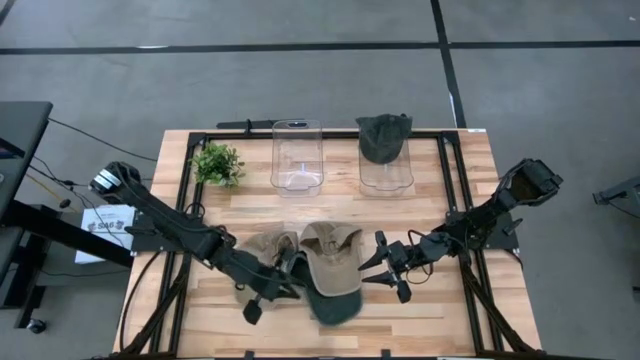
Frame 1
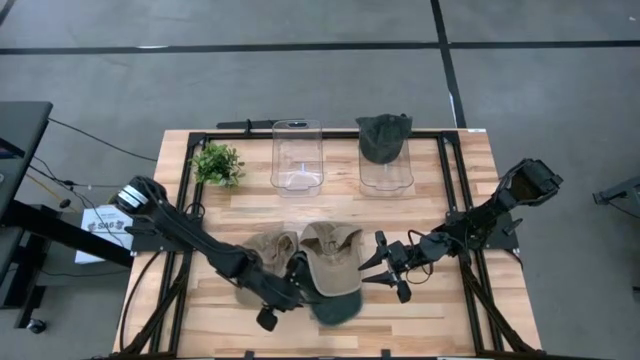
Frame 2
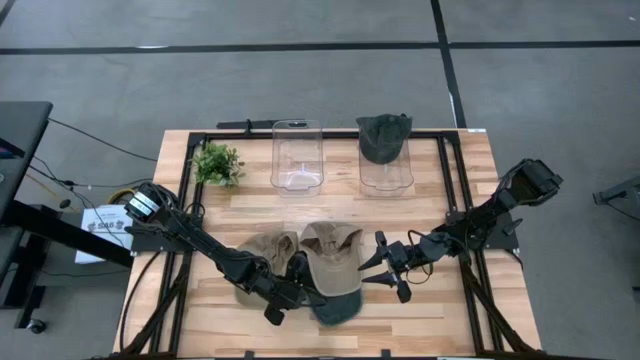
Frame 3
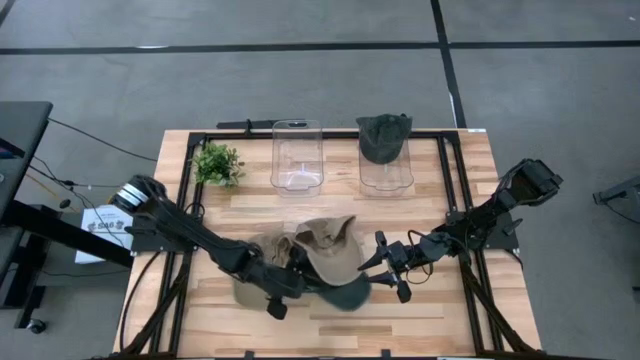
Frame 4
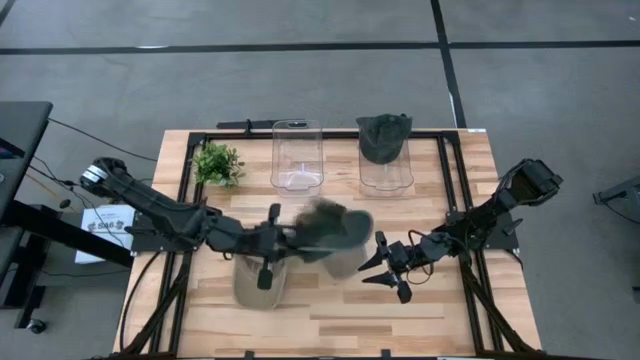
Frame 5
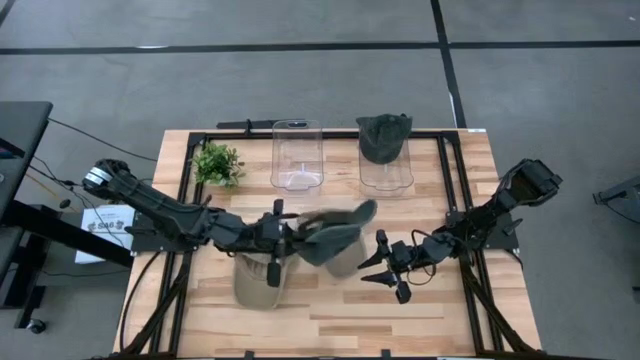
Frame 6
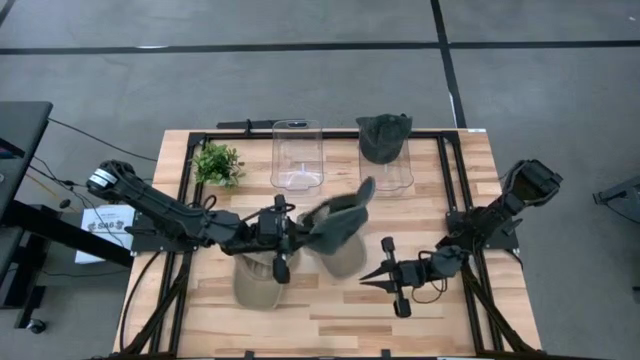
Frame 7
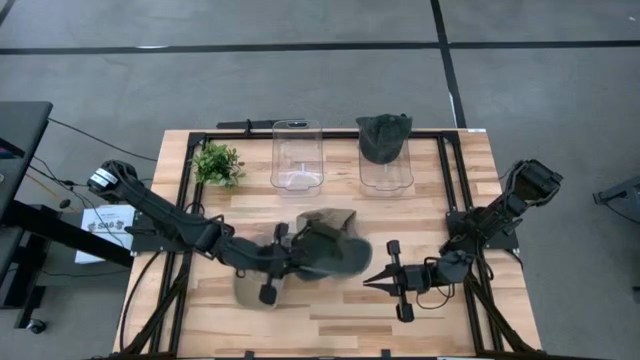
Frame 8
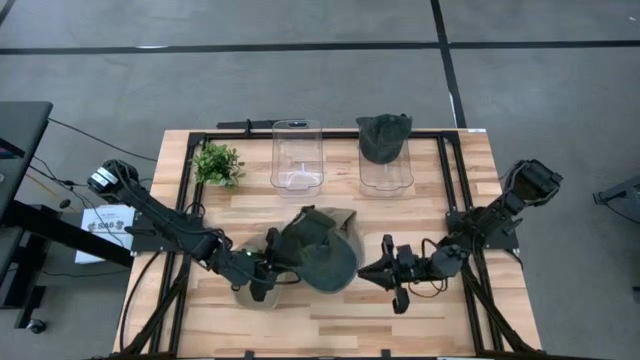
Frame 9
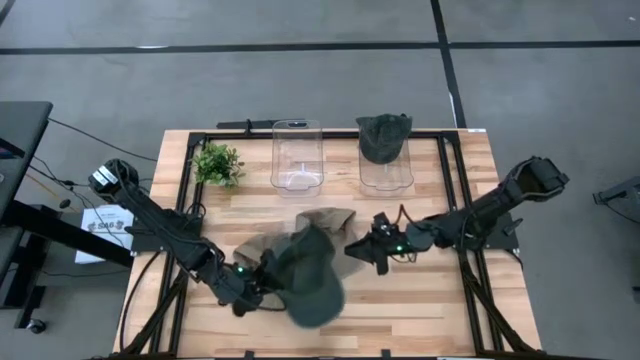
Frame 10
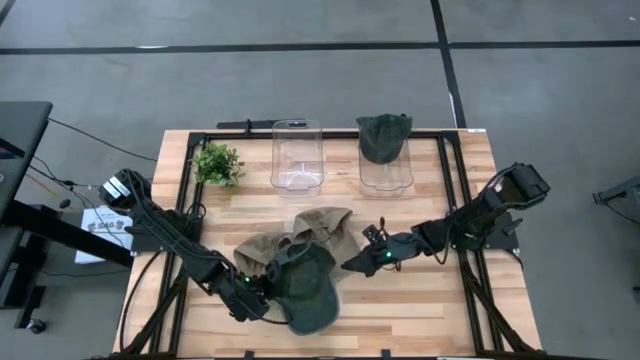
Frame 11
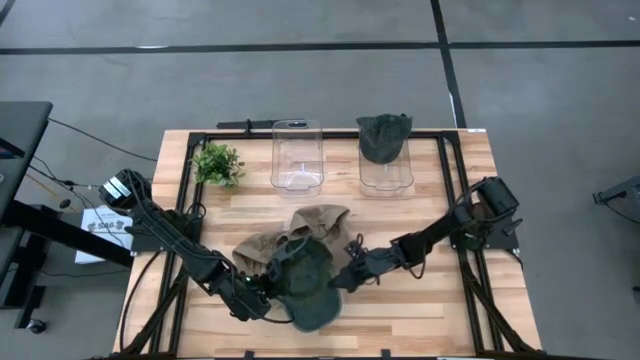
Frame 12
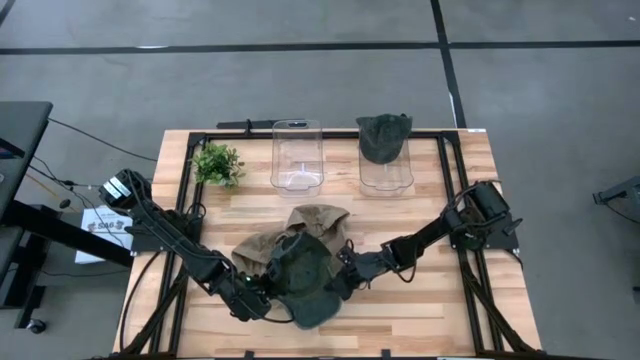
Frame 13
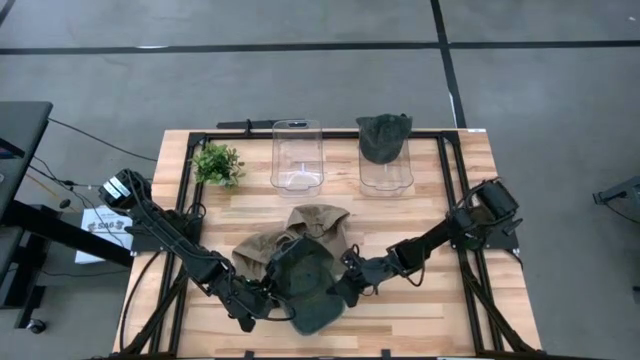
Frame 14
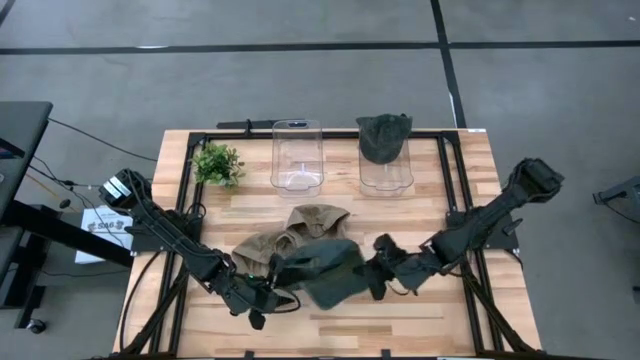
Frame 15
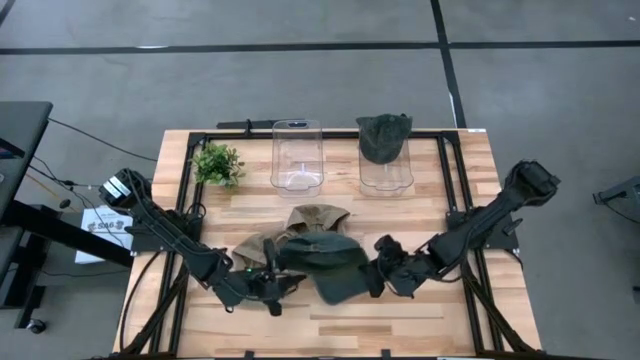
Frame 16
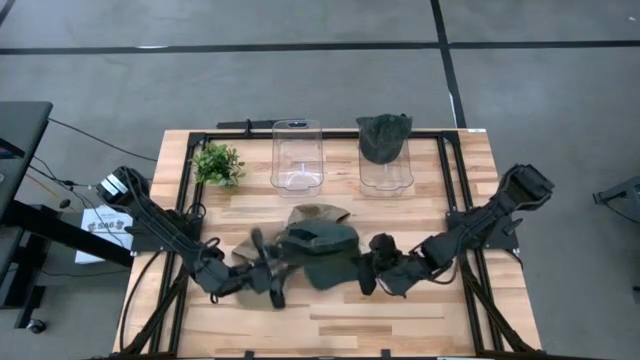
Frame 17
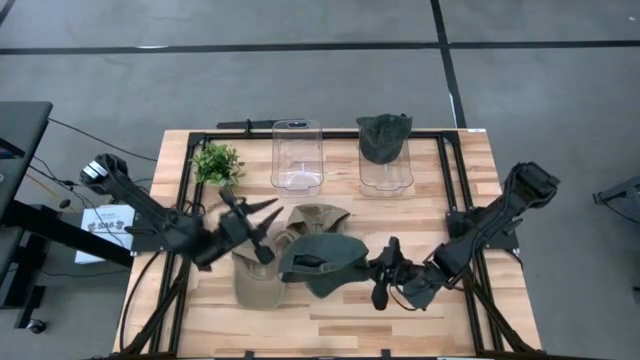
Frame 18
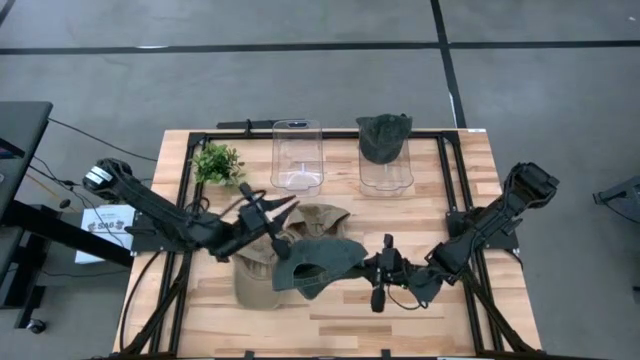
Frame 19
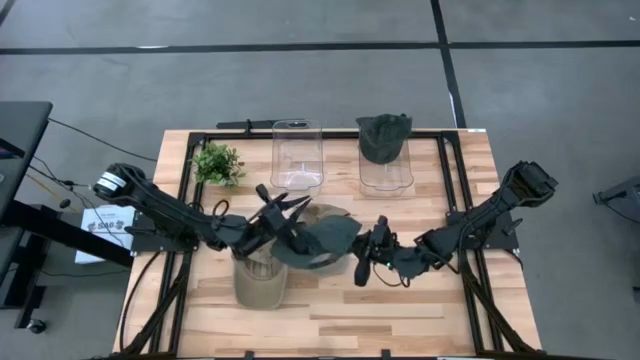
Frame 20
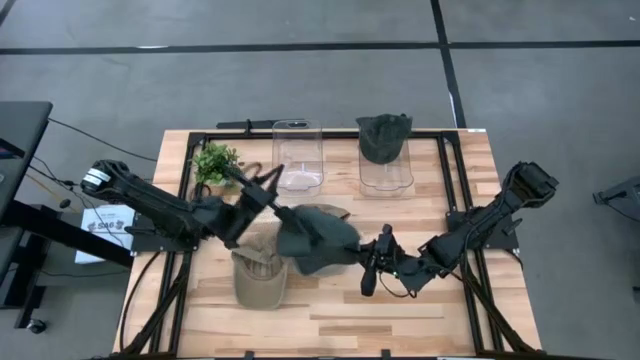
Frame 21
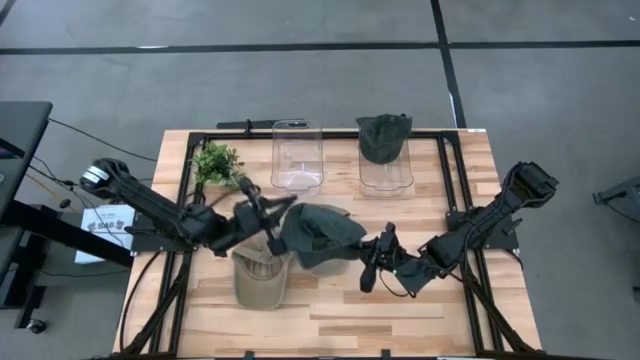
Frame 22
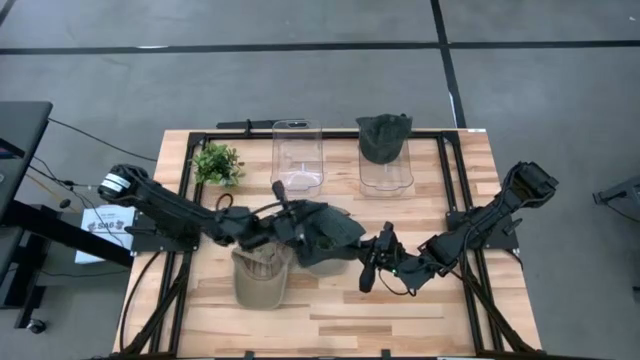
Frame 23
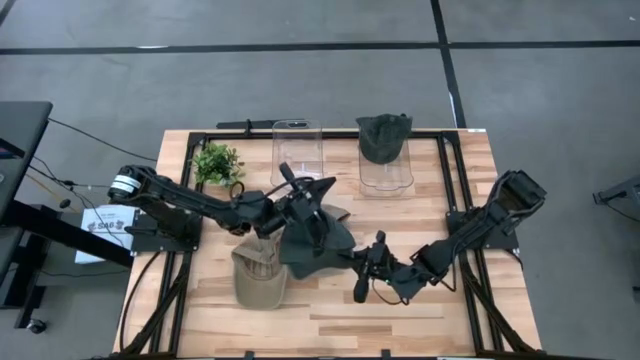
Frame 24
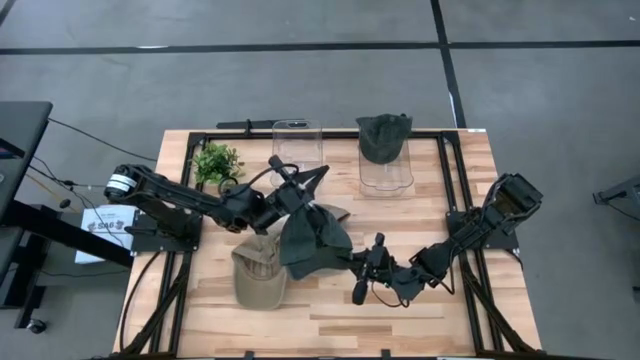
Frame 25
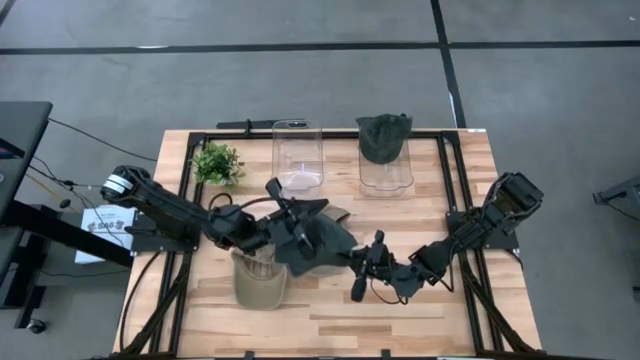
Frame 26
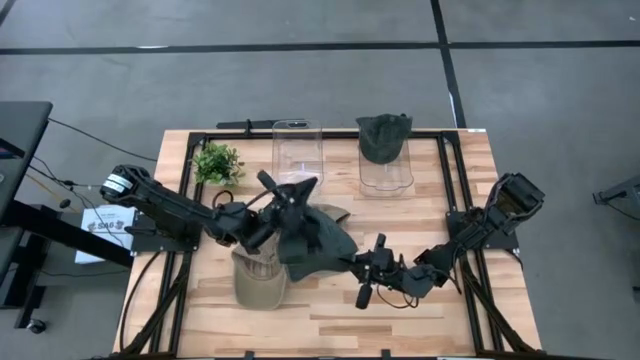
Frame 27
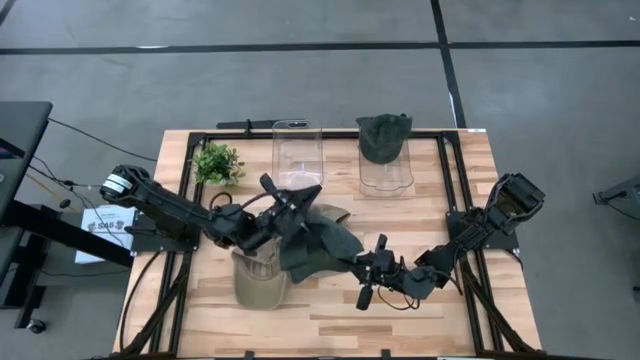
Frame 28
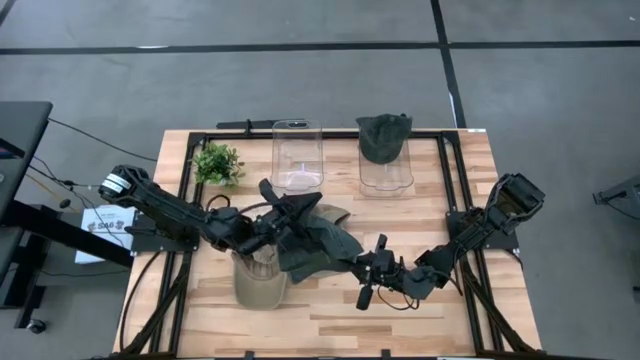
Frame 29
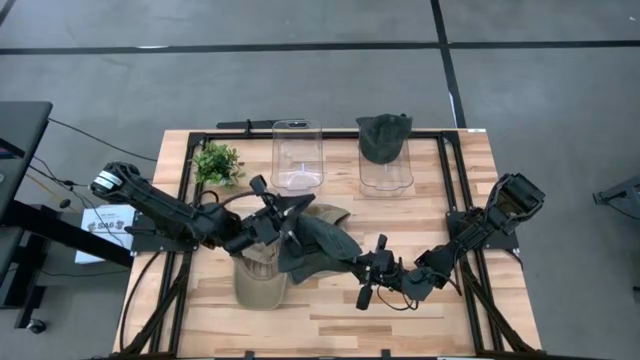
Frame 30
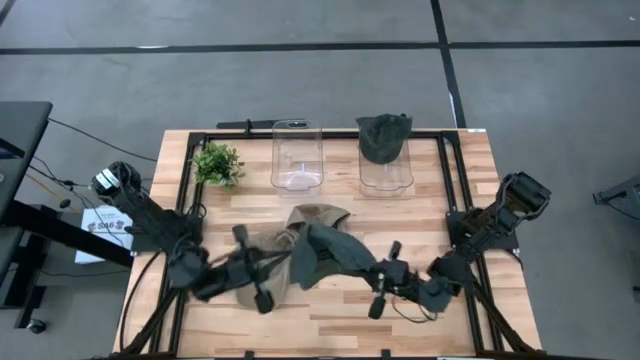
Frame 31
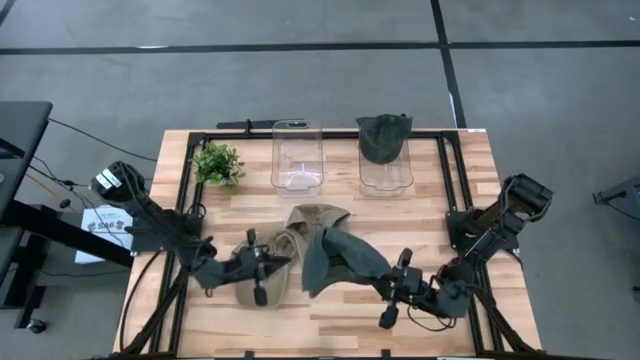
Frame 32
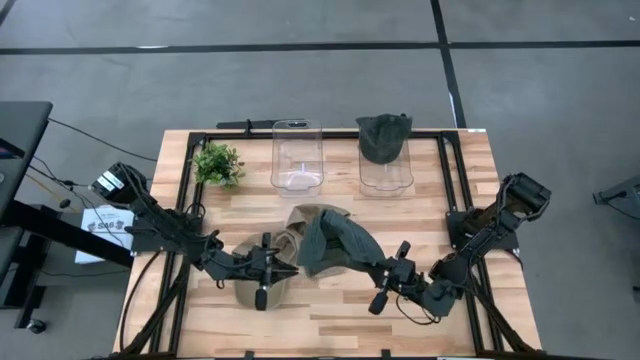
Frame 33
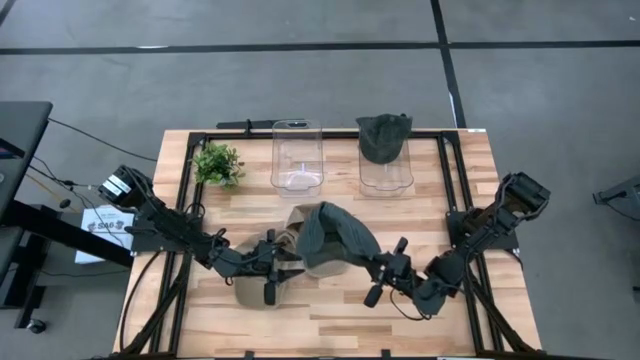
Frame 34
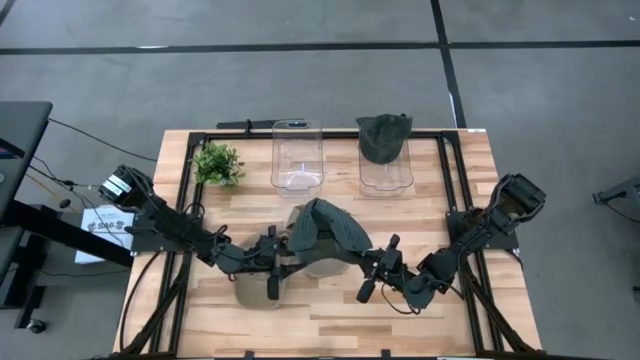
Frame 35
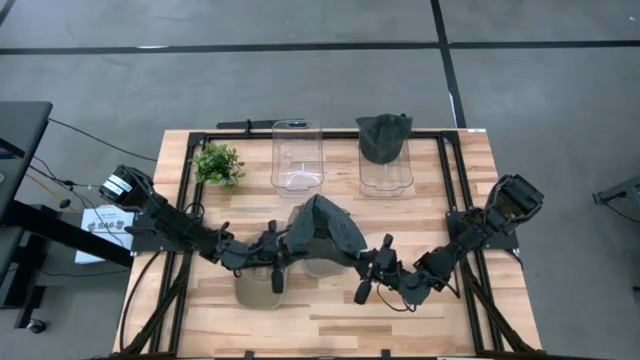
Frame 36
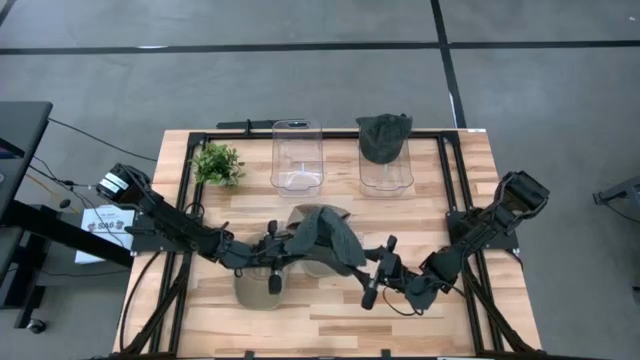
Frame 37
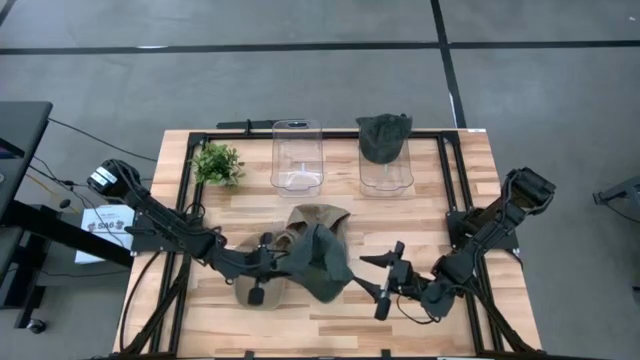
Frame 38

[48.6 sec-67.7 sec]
Task: Pick & Place hat
Put the black cap into the right transparent bin

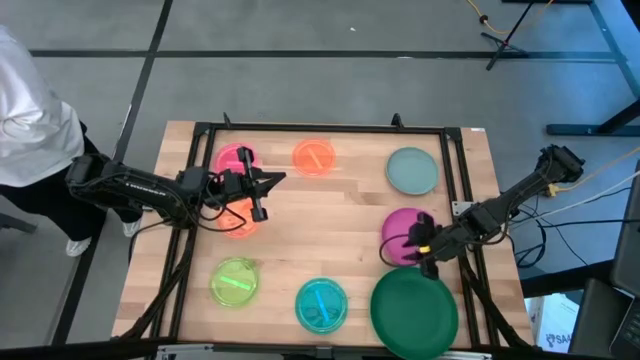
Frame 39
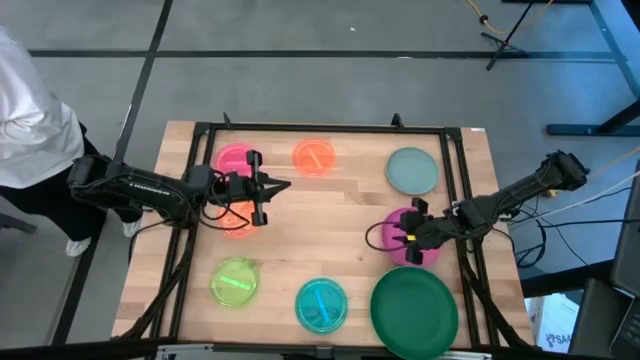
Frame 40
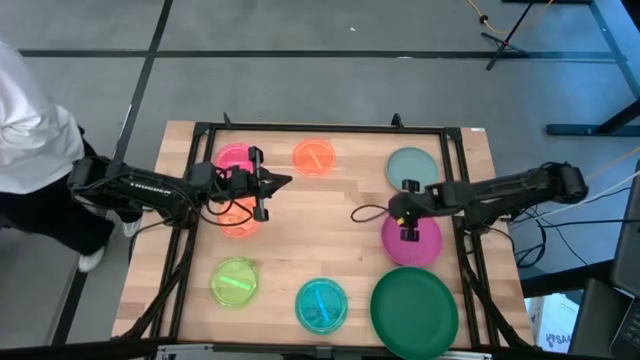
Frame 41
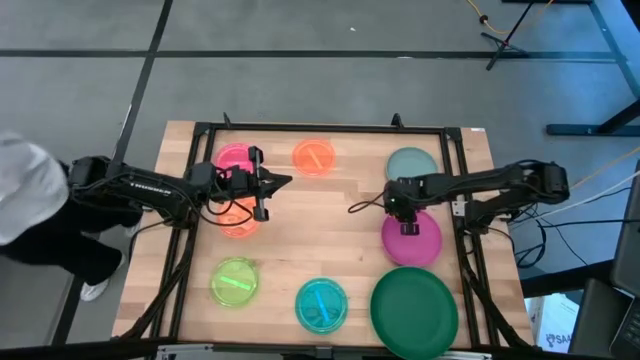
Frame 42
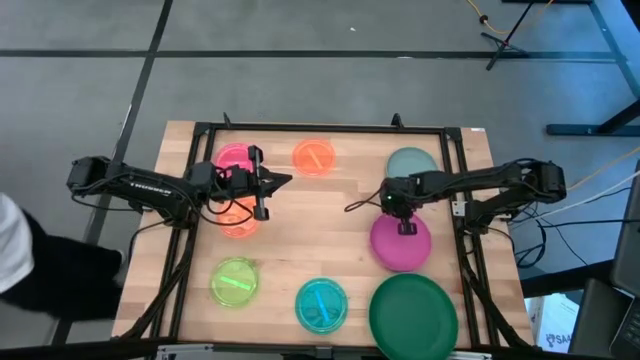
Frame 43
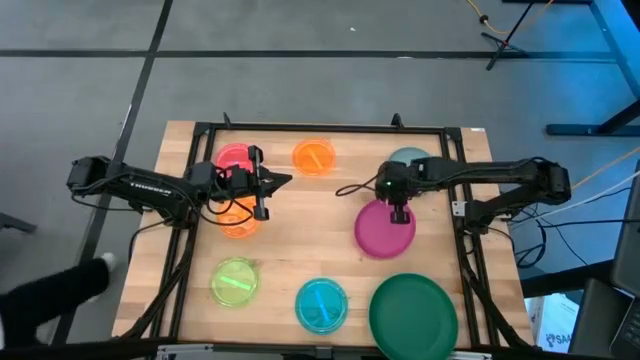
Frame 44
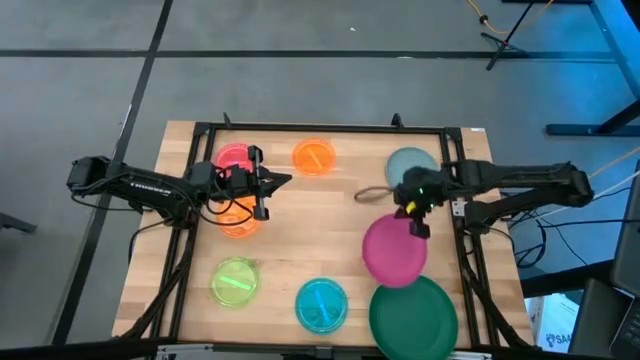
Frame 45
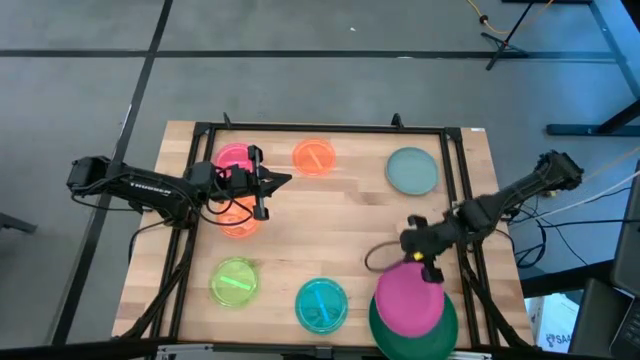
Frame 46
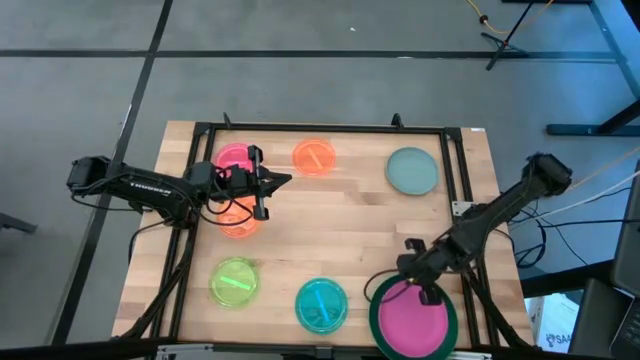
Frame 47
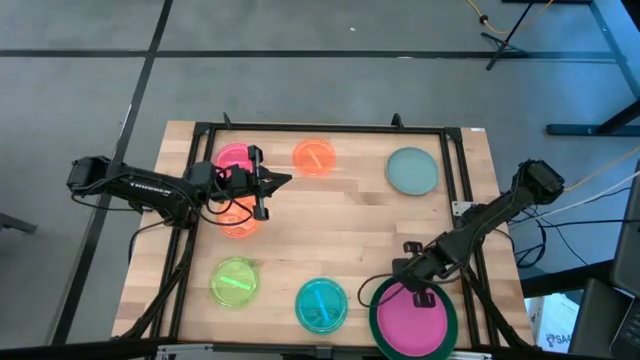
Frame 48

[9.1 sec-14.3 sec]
Task: Stack plastic plates
Stack the pink plate on the green plate
